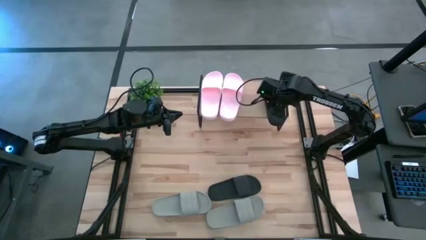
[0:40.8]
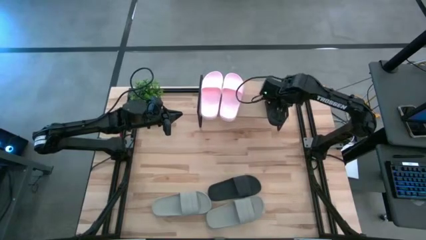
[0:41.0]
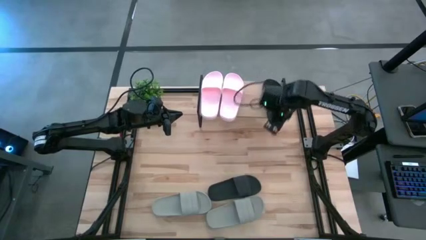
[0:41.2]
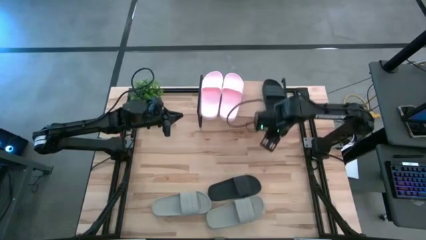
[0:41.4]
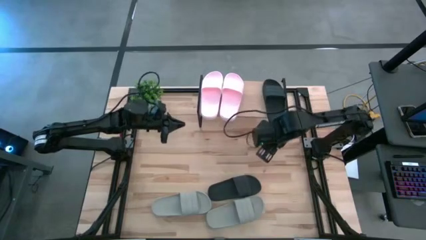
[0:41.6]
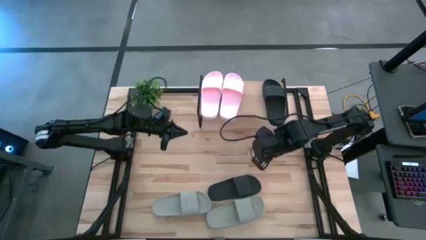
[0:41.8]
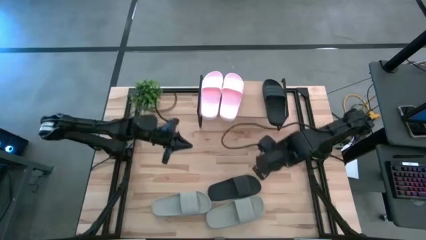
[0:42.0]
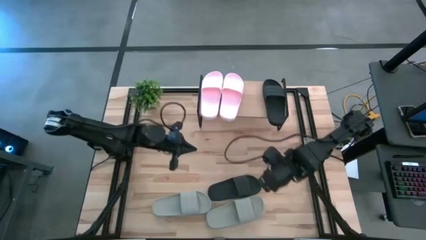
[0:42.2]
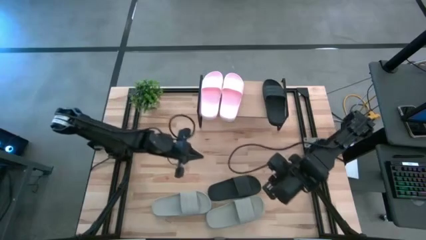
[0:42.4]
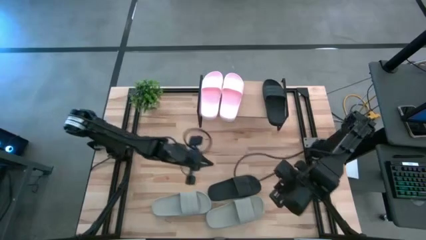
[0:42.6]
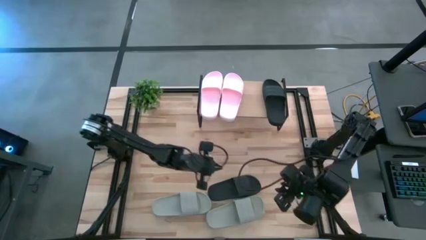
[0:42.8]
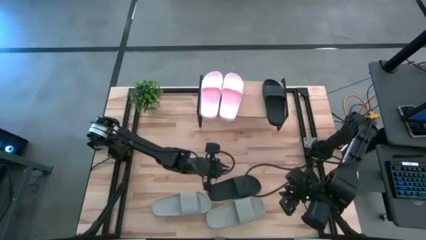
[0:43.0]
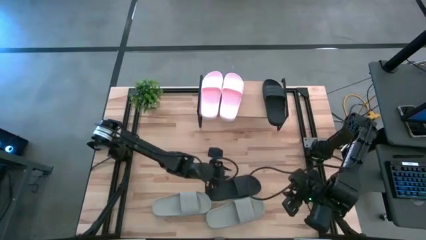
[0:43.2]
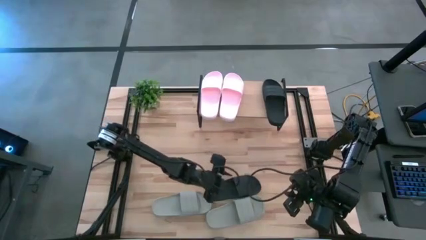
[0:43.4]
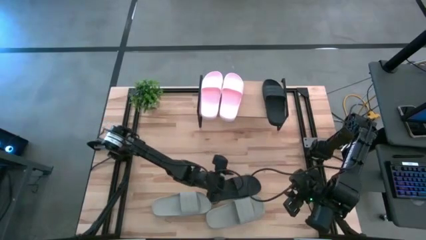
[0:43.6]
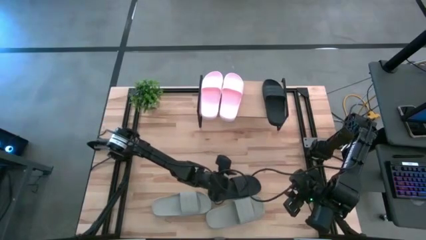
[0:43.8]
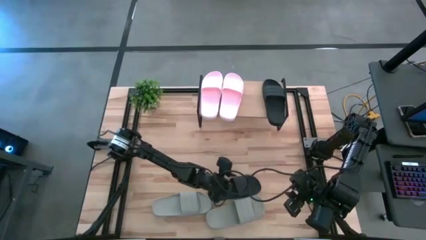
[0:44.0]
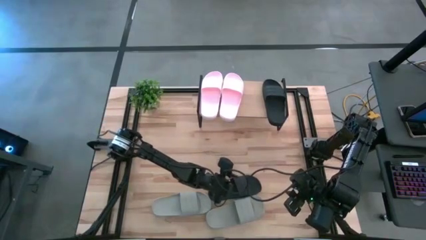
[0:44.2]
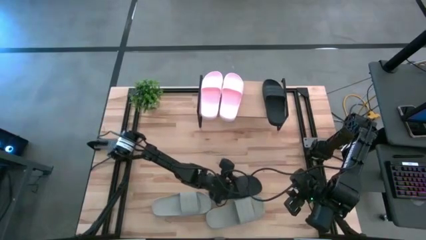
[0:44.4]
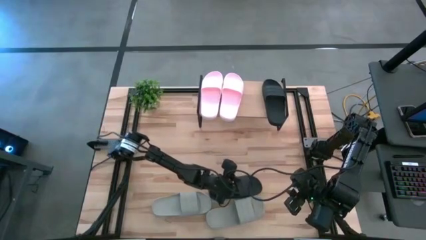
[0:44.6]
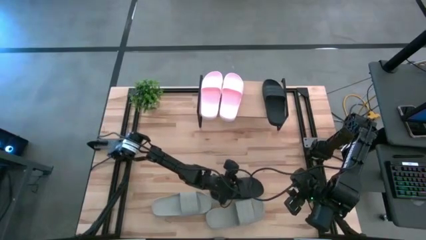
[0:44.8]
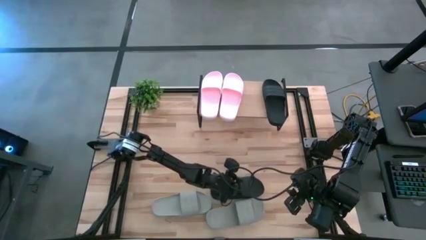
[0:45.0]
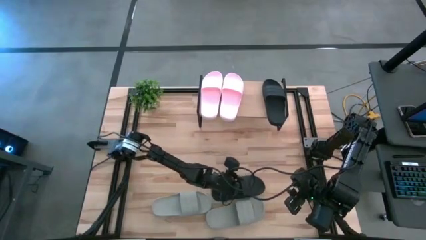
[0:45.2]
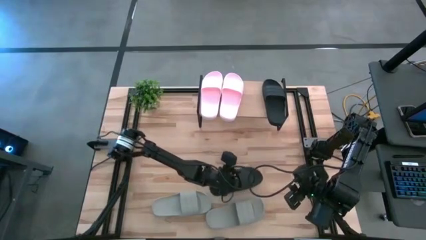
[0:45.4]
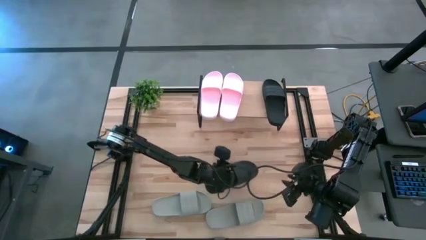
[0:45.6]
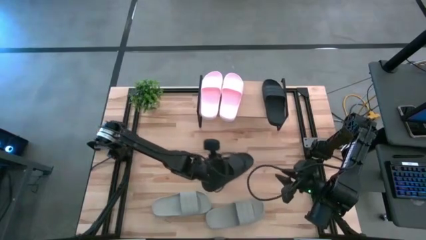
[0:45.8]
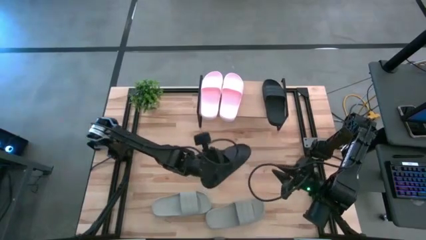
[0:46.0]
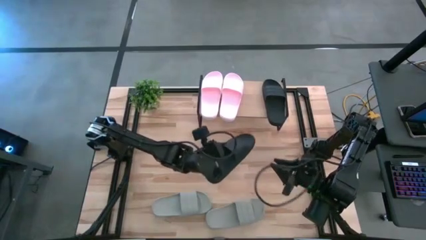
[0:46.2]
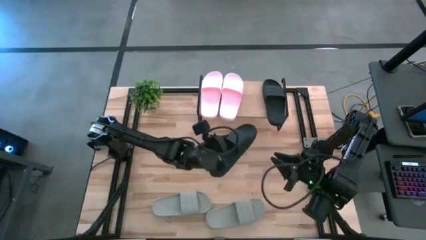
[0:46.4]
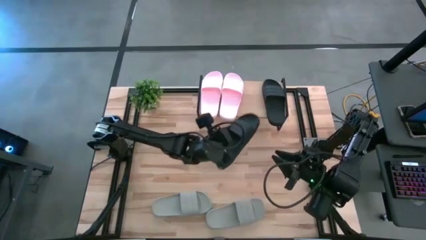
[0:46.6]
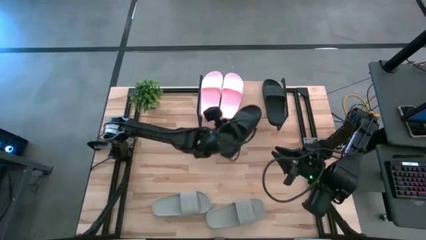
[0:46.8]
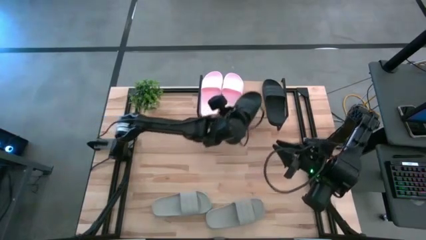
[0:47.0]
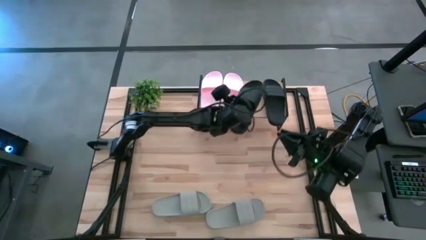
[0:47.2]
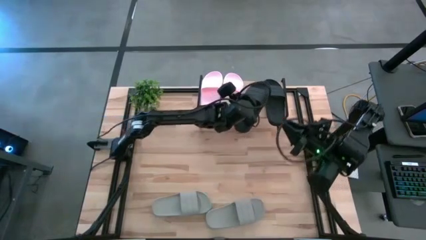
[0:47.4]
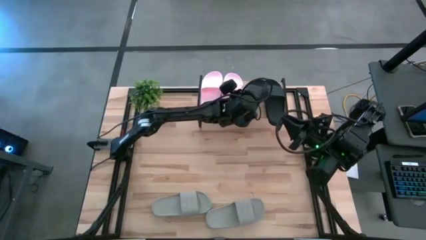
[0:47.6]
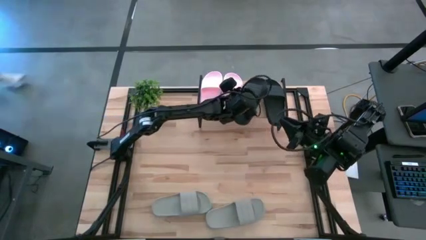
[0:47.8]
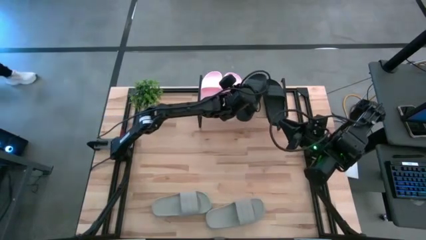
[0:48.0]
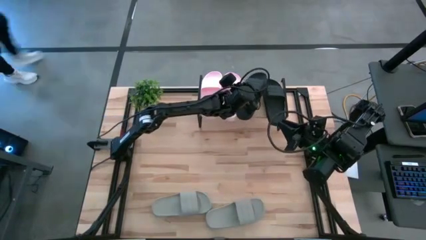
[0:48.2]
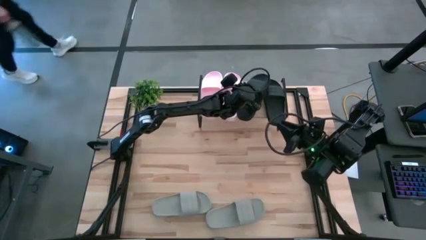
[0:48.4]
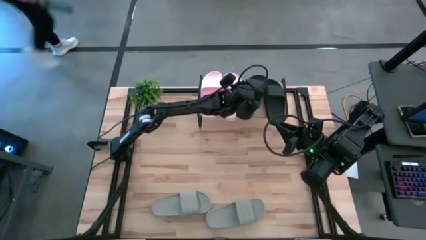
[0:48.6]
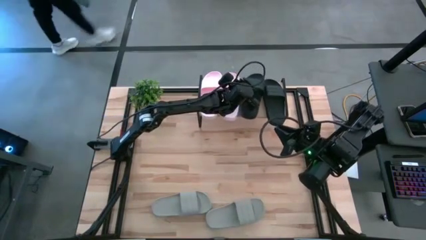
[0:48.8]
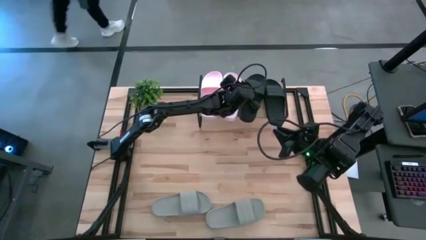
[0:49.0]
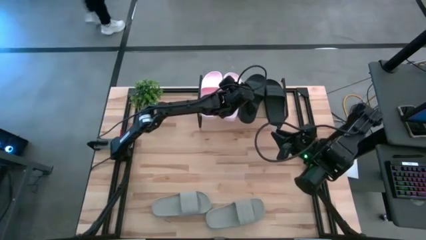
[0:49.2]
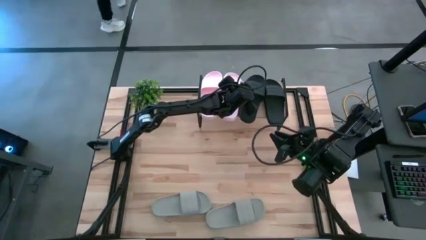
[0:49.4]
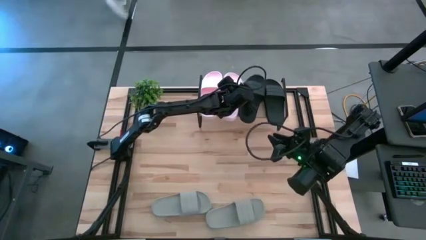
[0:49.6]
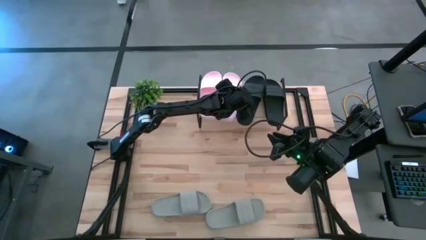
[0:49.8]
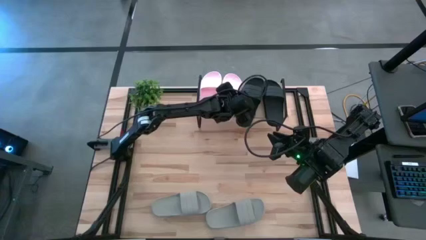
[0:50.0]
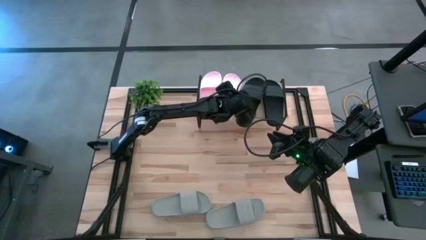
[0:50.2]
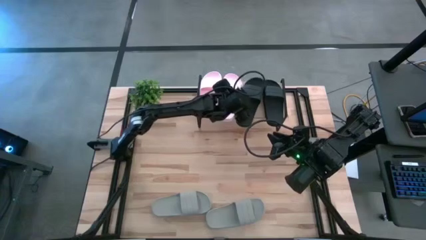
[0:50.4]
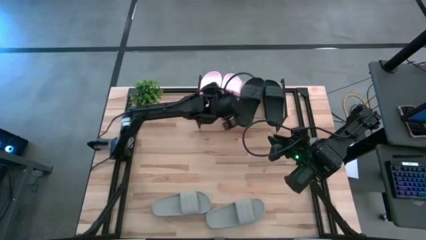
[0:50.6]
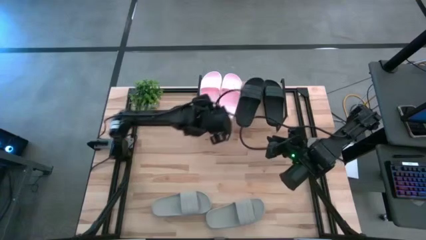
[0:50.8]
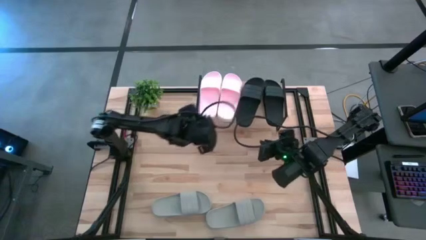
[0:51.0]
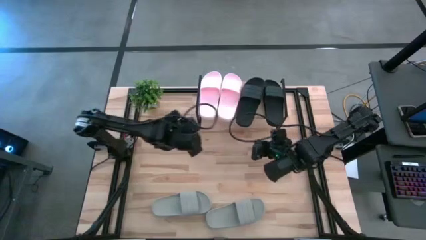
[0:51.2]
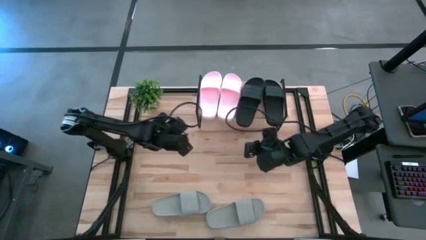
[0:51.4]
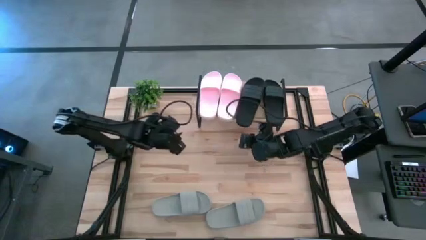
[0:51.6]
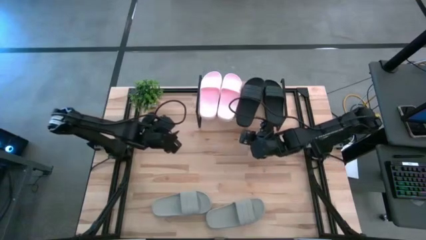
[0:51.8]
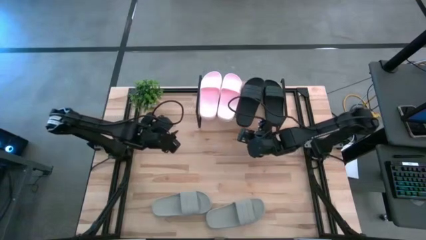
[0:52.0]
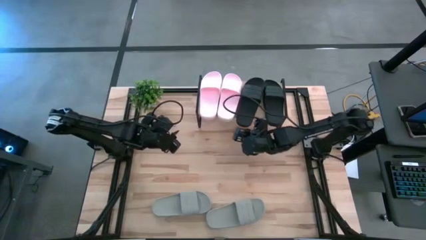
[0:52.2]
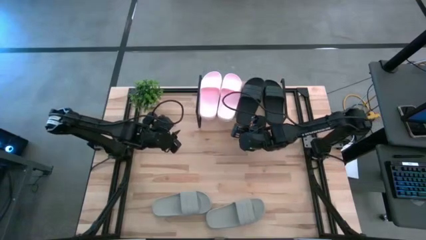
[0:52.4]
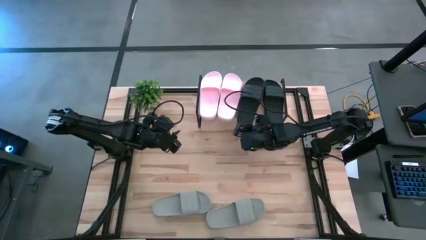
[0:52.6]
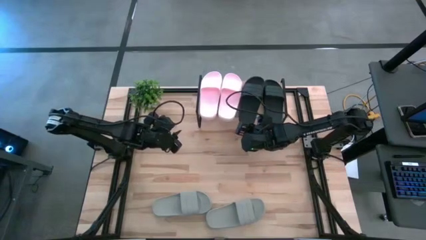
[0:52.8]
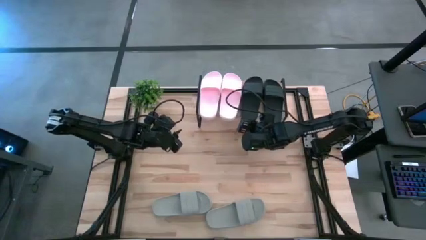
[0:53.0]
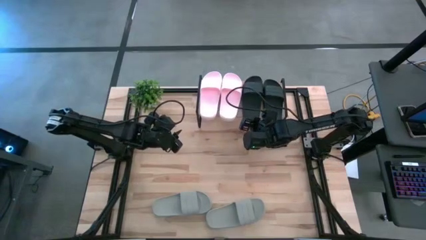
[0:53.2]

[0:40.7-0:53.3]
Task: Pick and place slides into the shelf
Put the black slide on the shelf

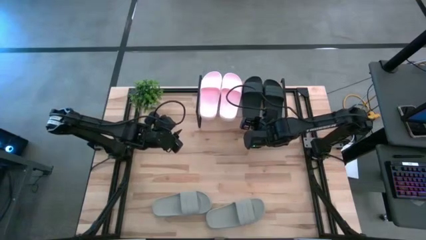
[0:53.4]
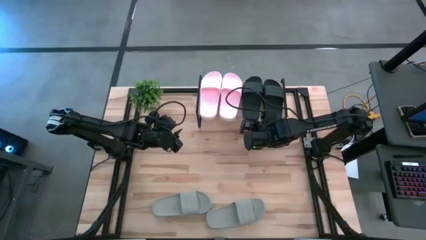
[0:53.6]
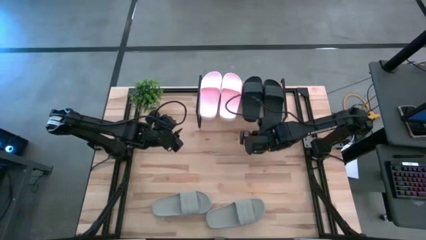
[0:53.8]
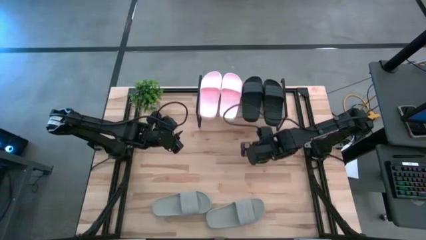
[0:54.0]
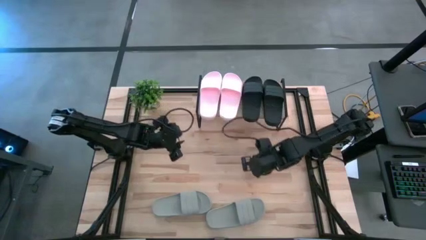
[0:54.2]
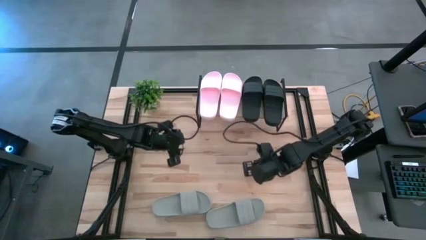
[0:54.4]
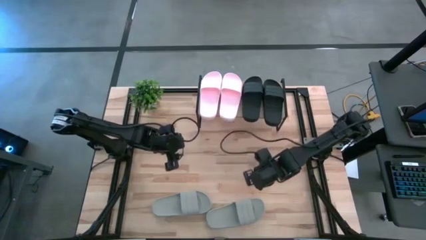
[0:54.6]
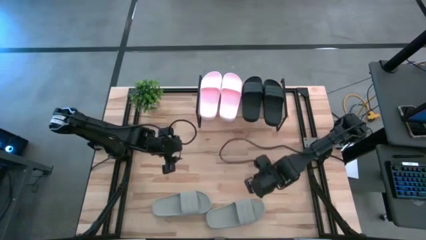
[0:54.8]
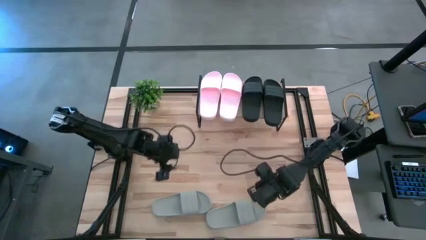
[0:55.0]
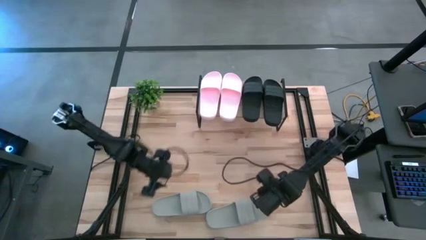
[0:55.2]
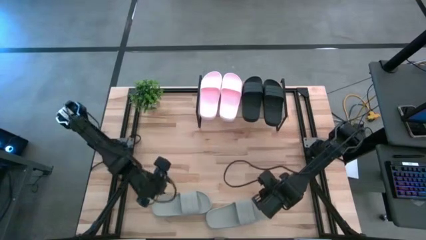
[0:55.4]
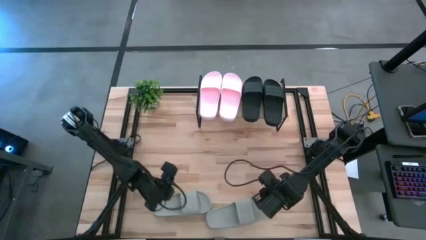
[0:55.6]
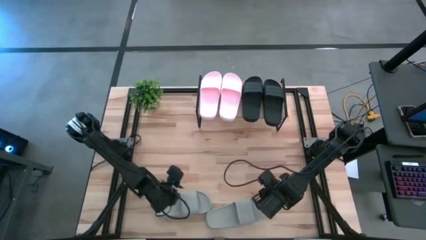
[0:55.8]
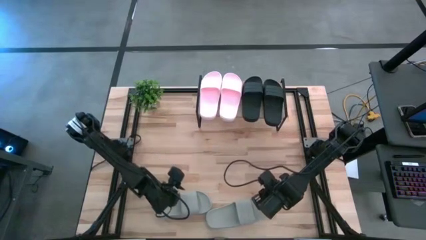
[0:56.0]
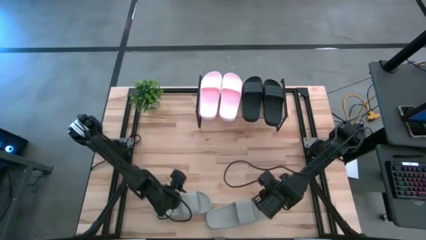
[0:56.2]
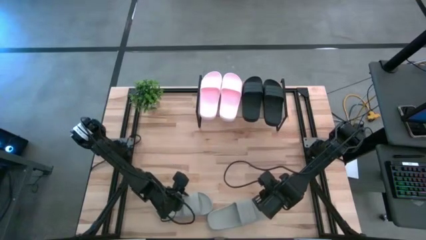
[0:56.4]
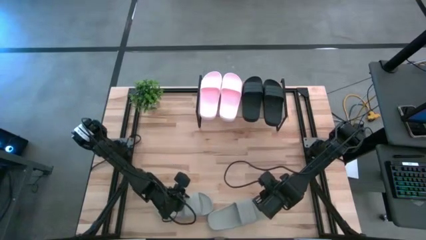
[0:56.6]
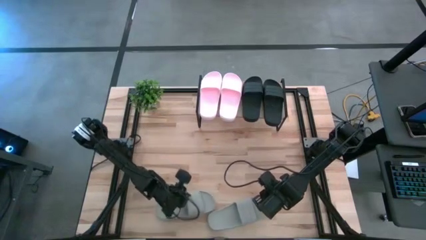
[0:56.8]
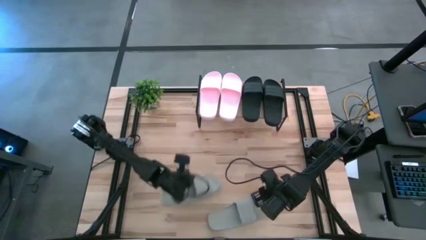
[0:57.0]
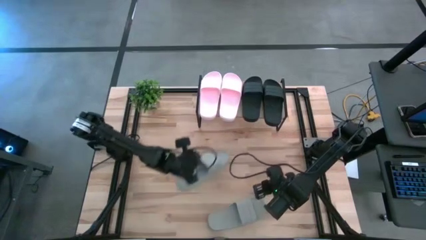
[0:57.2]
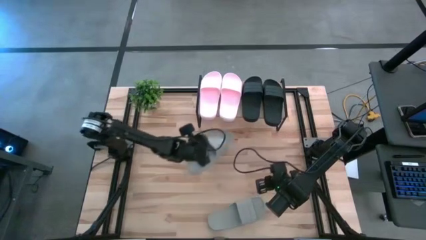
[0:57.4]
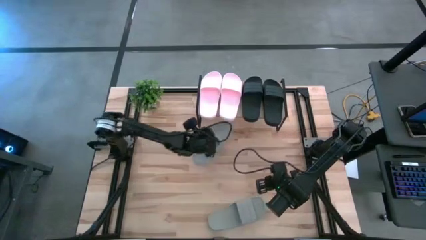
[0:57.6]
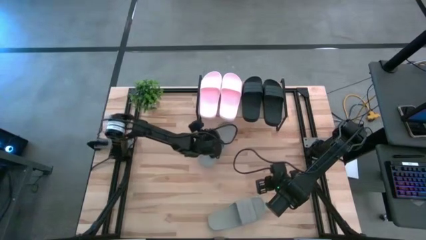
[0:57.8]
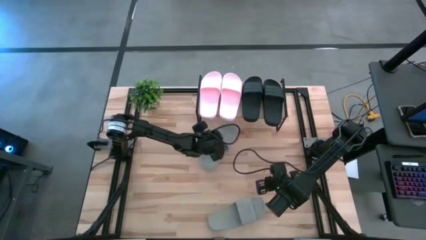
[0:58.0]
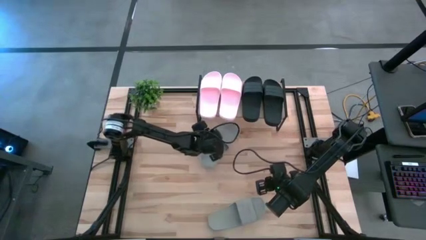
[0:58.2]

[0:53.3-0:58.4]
Move the left gray slide toward the shelf
